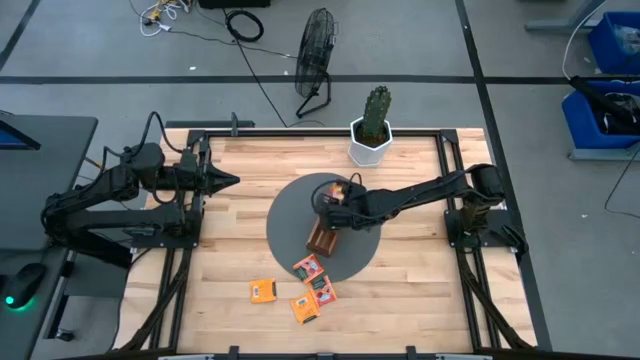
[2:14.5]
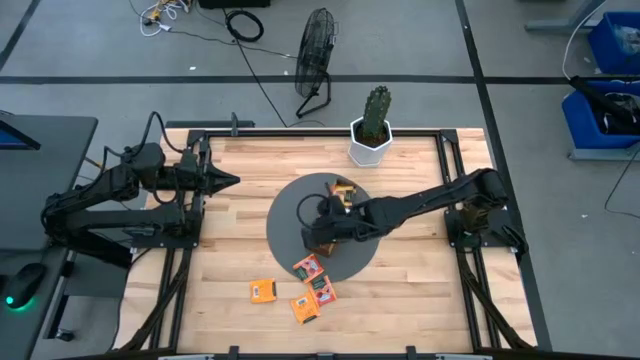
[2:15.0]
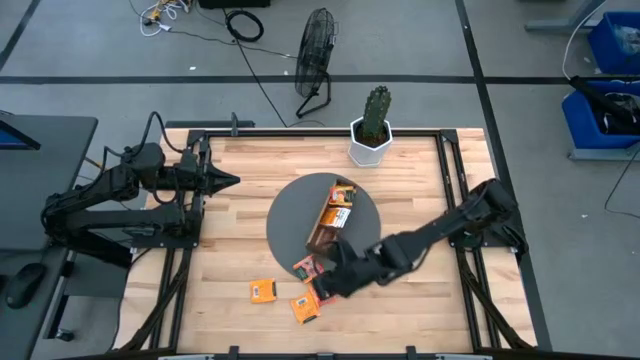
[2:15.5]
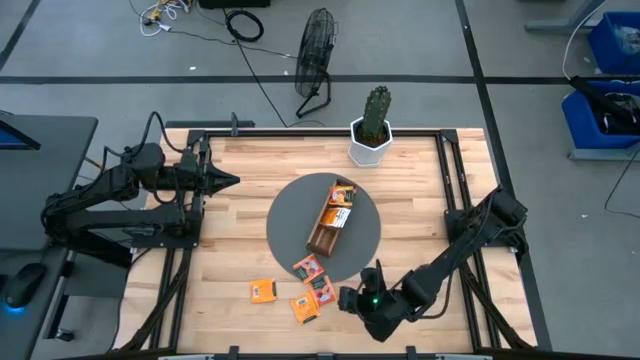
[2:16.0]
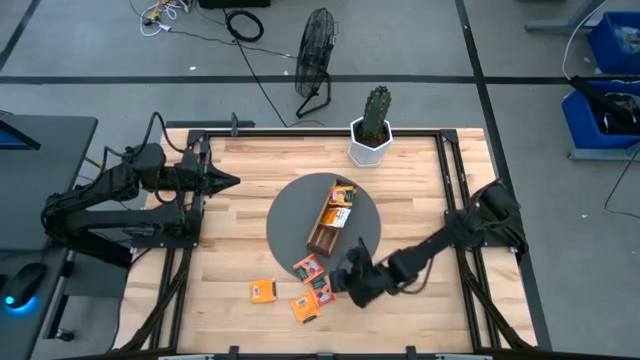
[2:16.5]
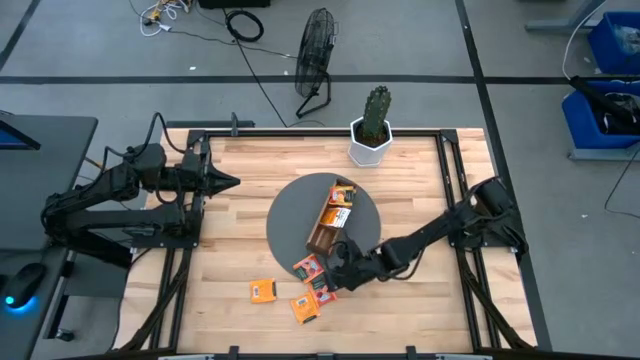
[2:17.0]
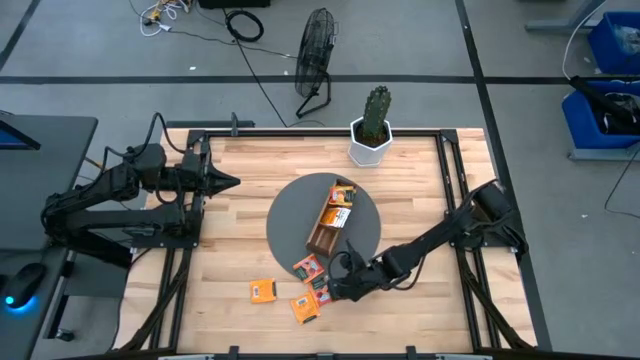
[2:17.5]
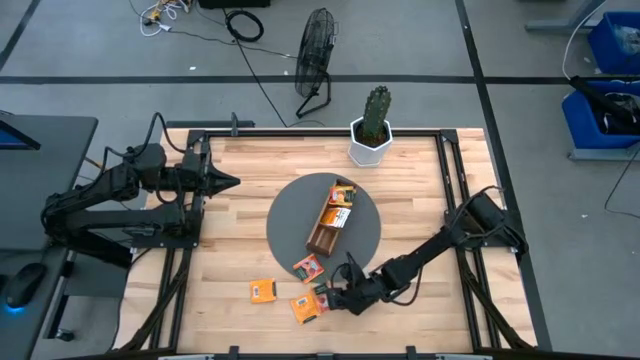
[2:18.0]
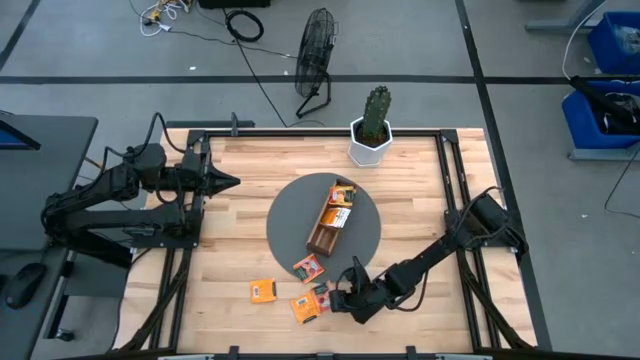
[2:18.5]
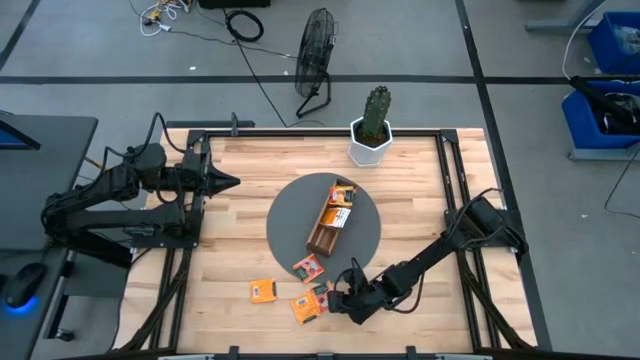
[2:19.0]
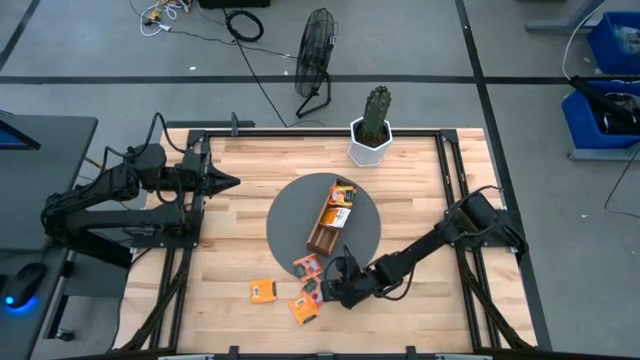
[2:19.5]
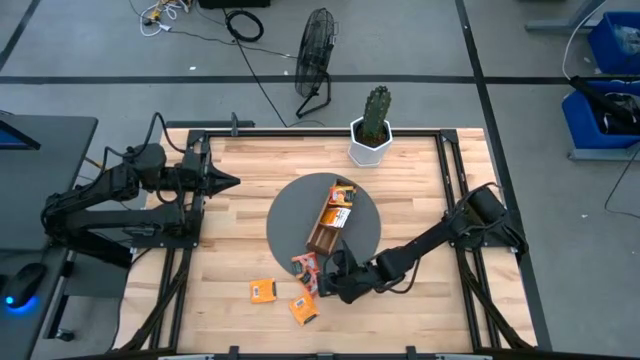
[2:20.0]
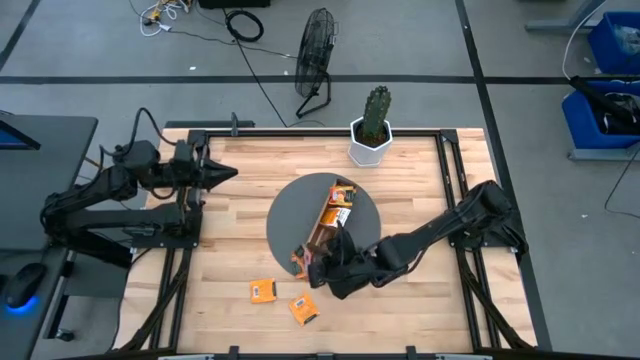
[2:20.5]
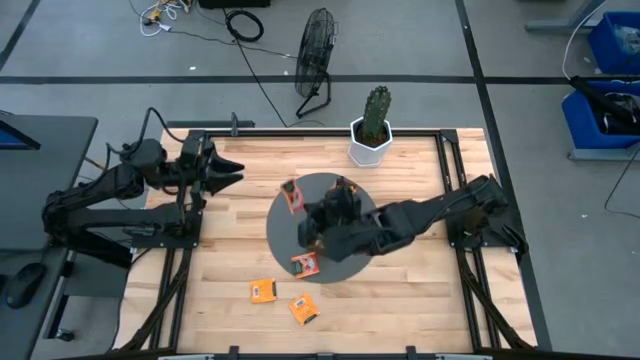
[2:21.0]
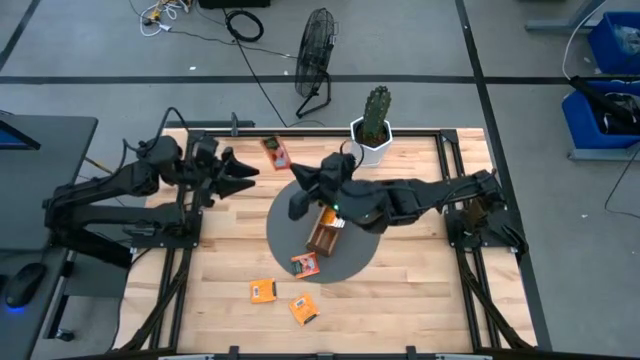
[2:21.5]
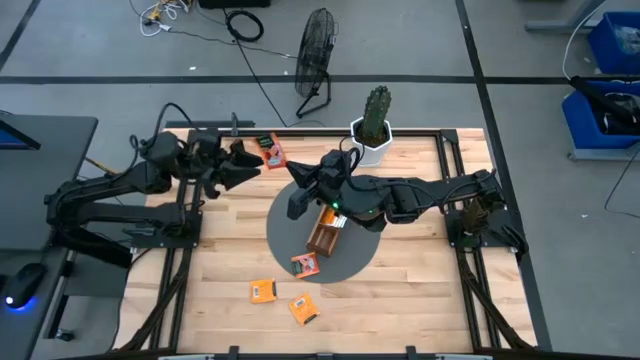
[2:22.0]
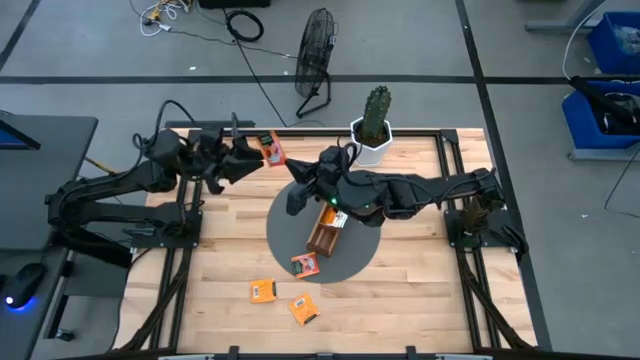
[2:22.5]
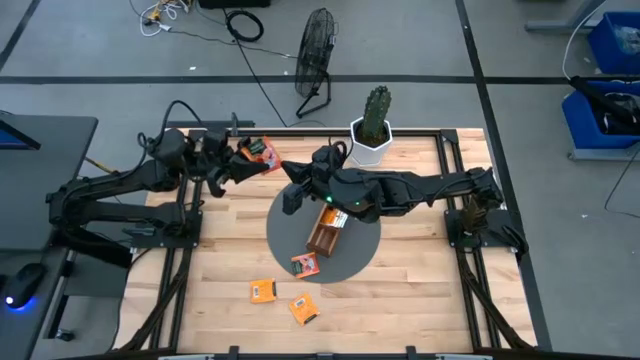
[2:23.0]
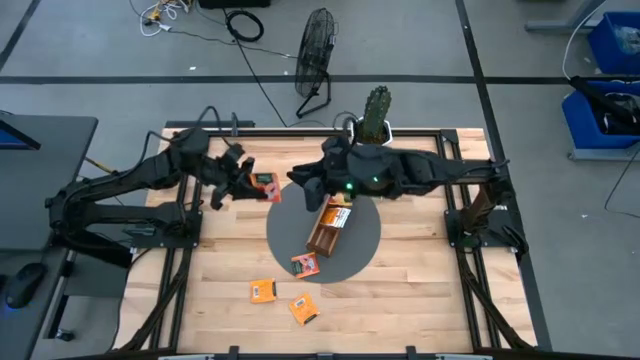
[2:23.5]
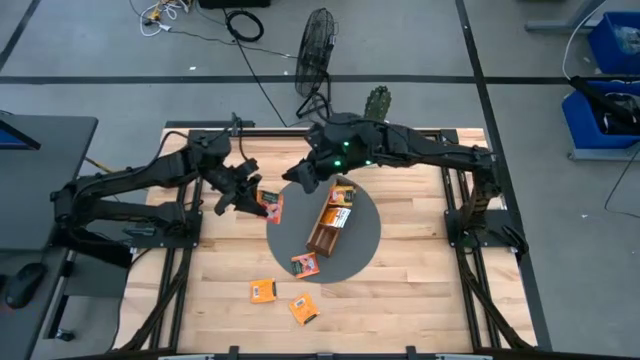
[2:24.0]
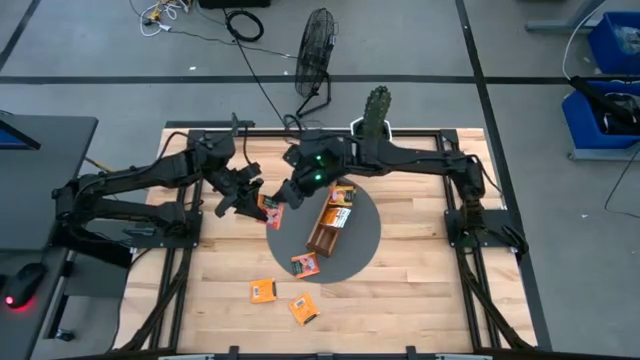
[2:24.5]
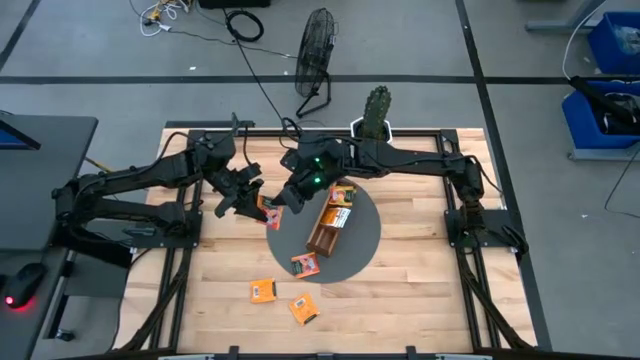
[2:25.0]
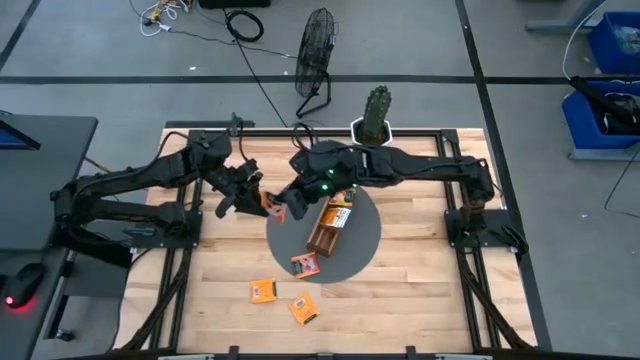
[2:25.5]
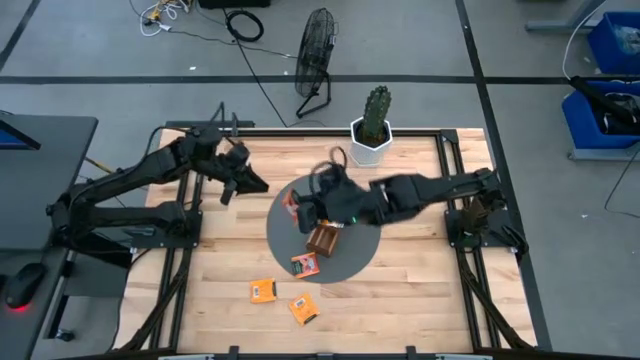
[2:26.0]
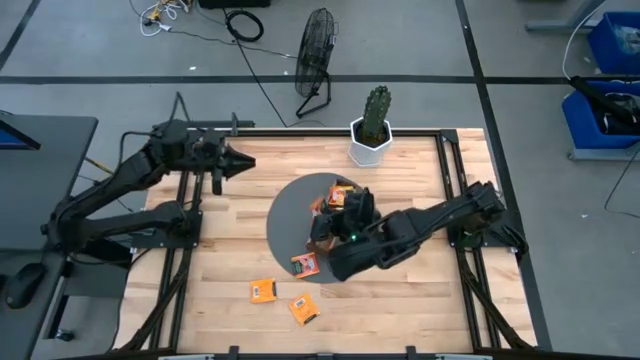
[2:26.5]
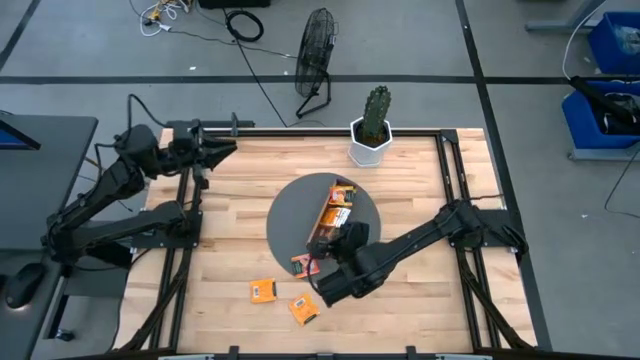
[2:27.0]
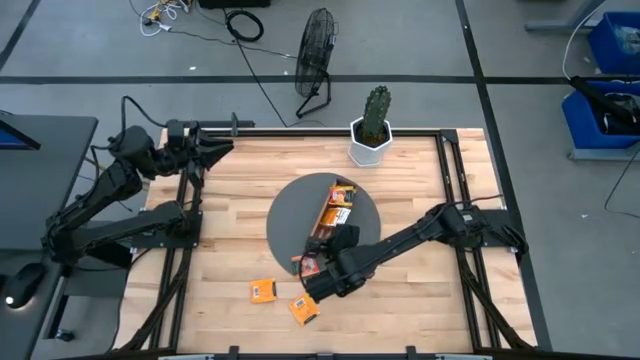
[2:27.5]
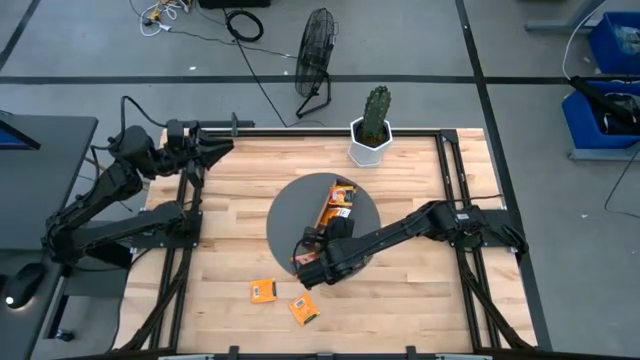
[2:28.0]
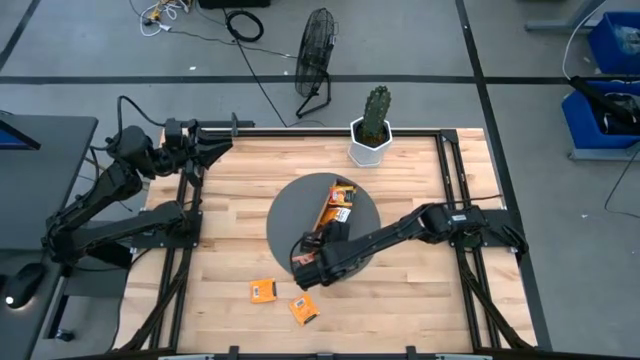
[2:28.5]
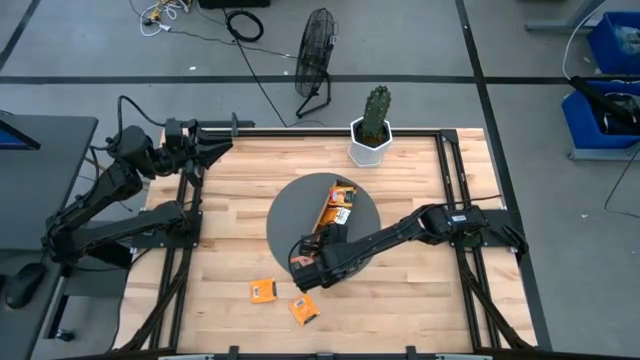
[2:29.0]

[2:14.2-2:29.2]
Task: Pick & Place Tea
Put the red tea bag into the bottom section of the wooden organizer

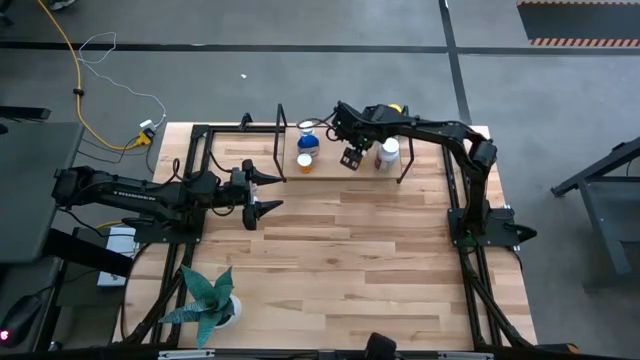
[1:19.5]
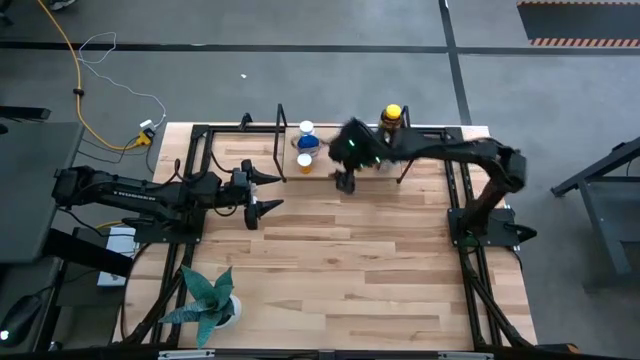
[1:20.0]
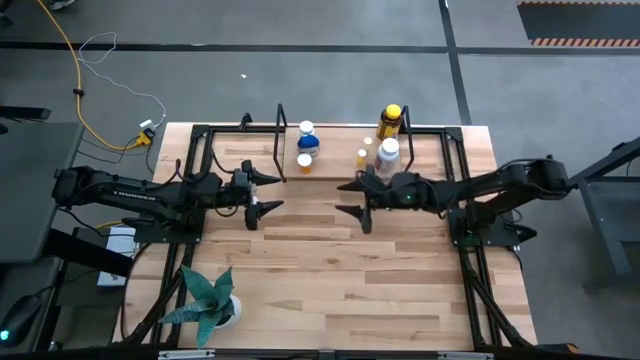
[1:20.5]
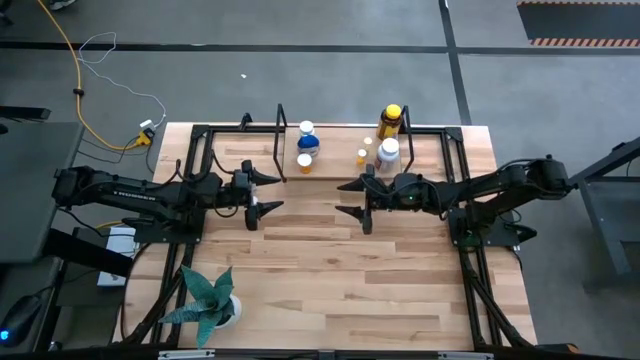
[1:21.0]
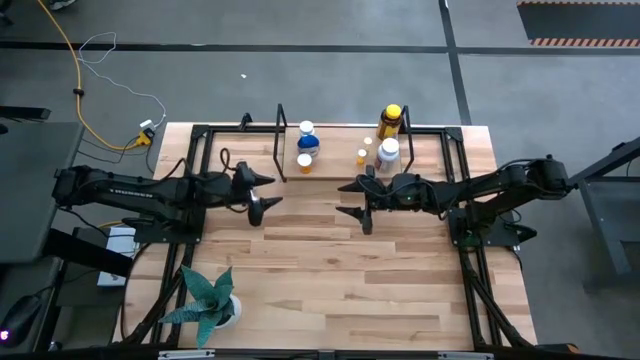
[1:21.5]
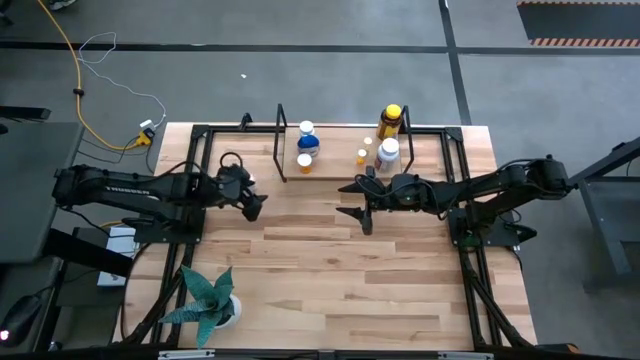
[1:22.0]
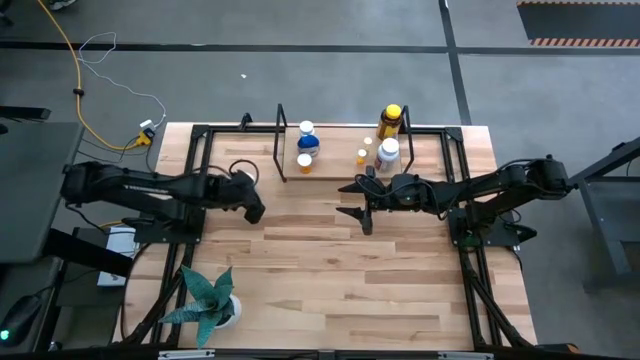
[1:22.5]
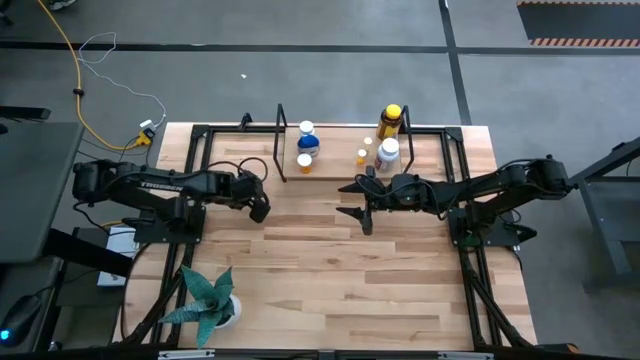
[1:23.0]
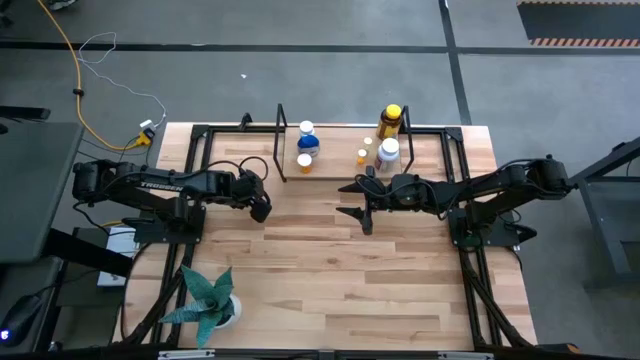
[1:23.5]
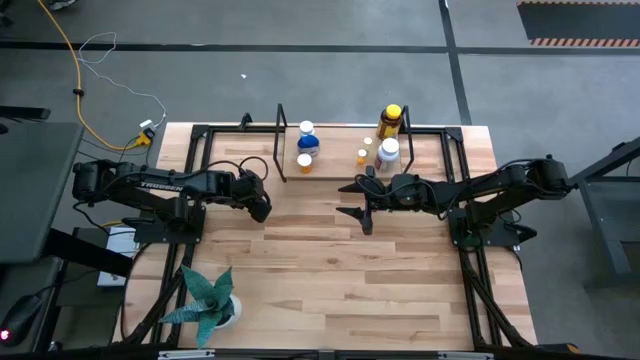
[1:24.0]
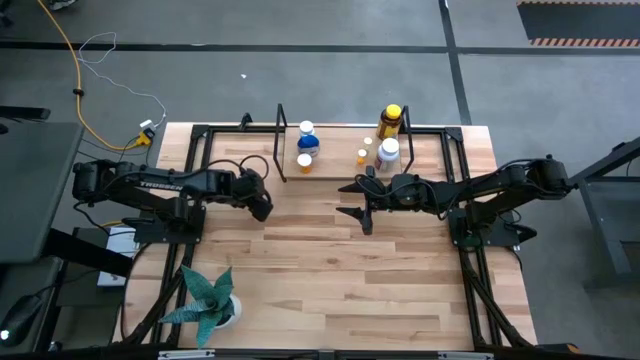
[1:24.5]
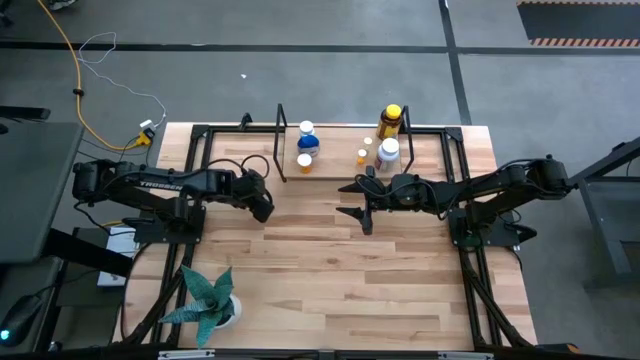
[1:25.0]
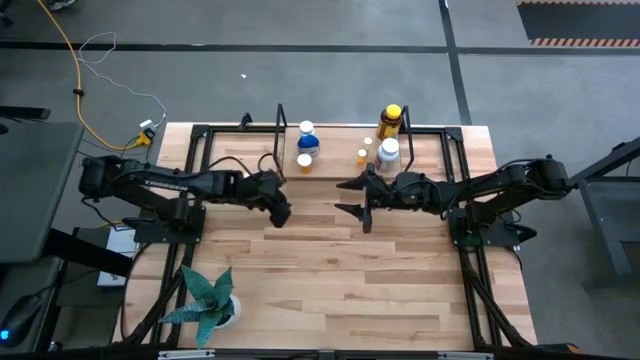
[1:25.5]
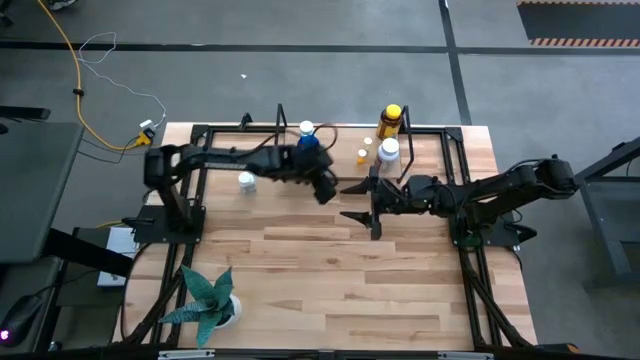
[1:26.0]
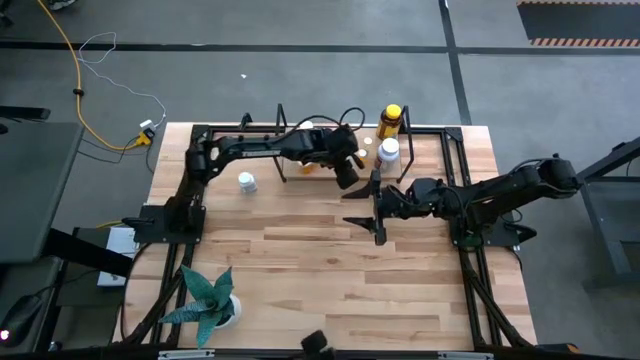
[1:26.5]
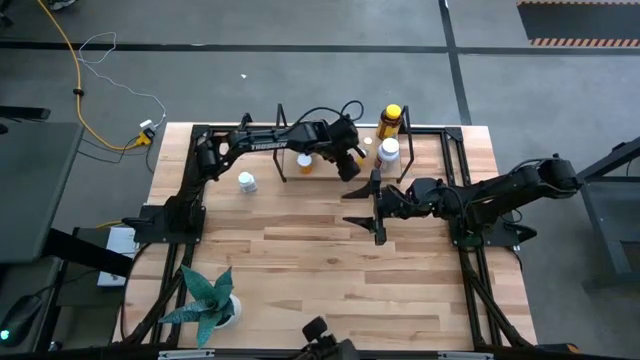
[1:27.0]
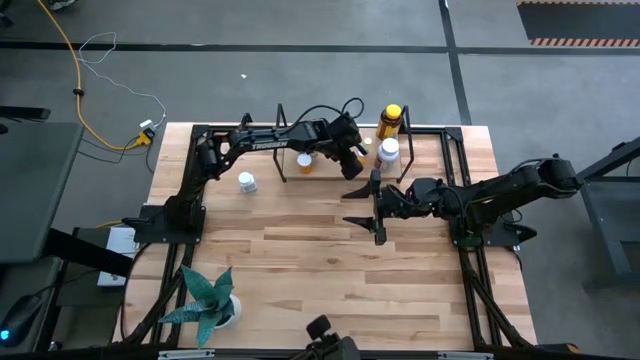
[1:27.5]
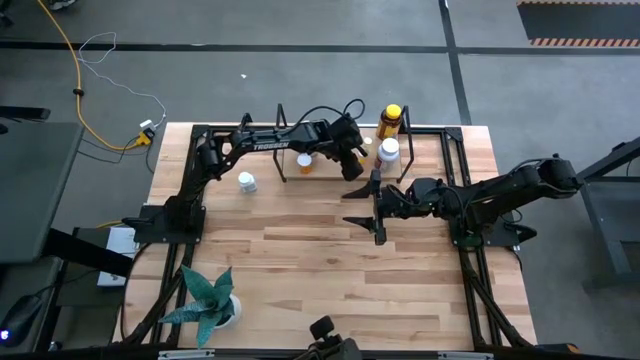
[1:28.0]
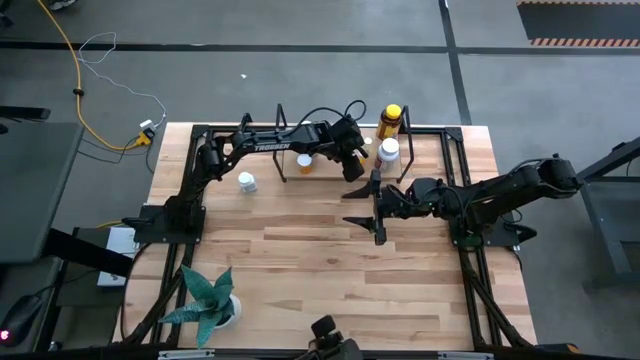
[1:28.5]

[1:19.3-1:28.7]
Task: Pick and place medicine bottles onto shelf by color
Put the small pink pill bottle on the shelf
